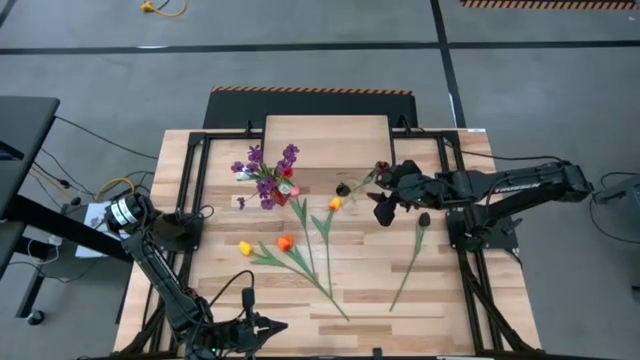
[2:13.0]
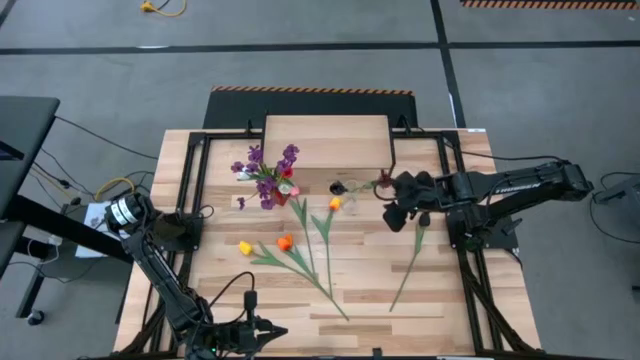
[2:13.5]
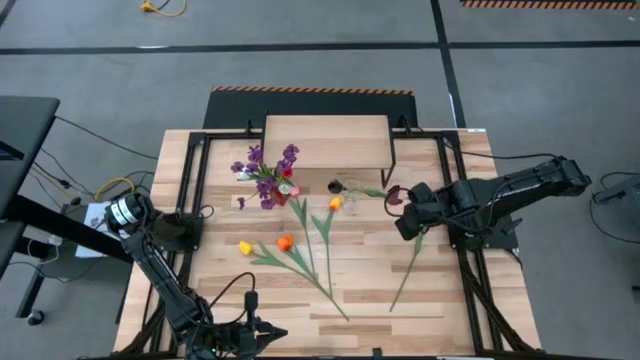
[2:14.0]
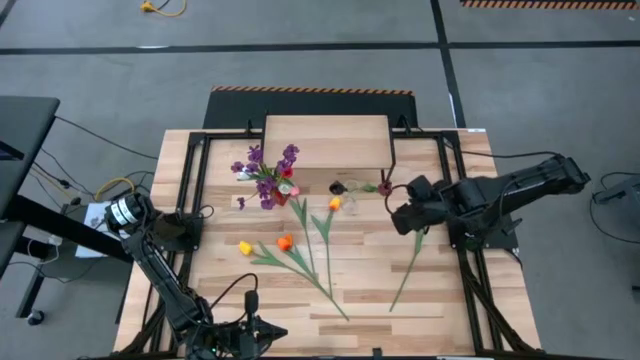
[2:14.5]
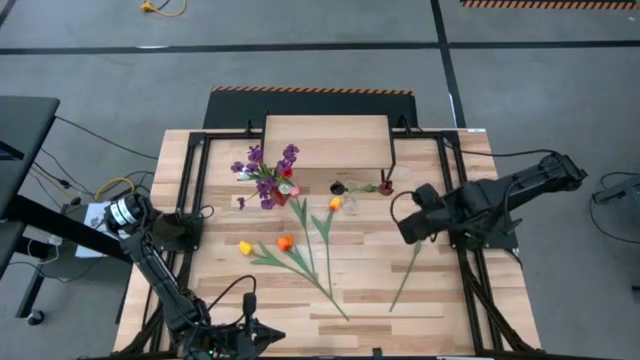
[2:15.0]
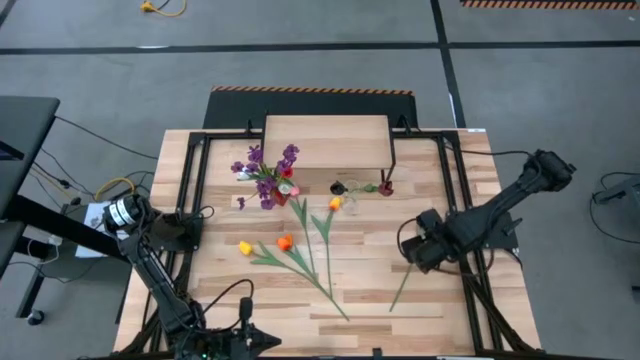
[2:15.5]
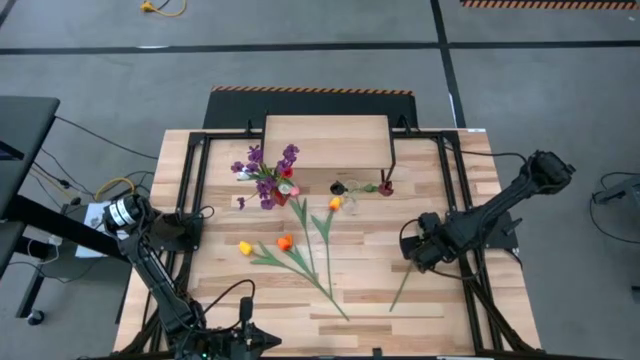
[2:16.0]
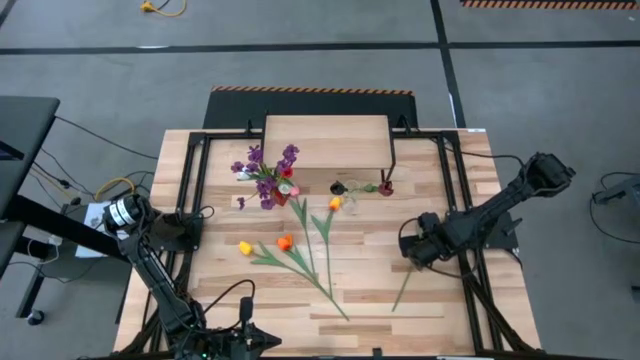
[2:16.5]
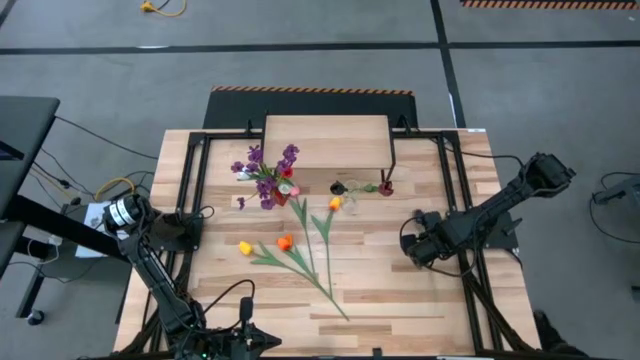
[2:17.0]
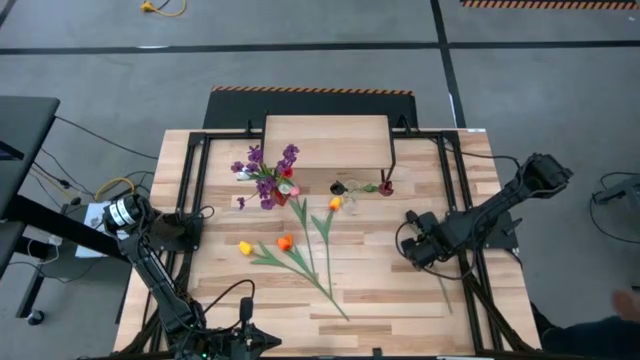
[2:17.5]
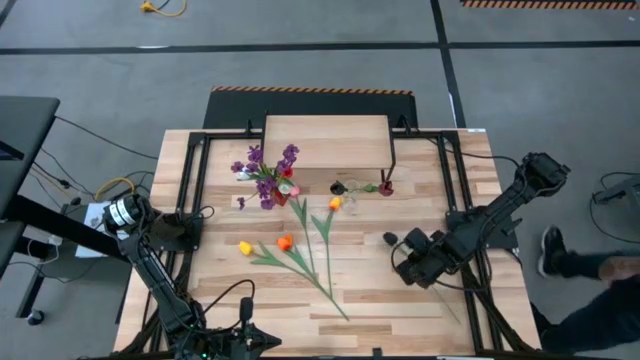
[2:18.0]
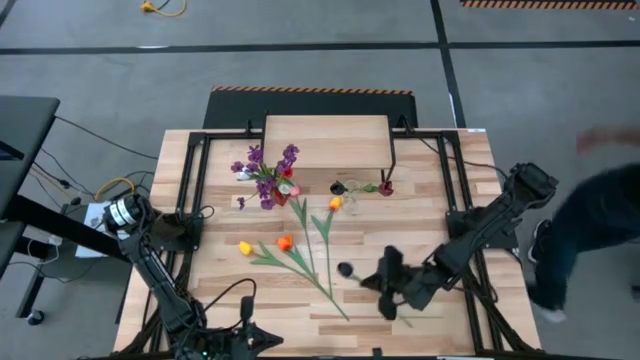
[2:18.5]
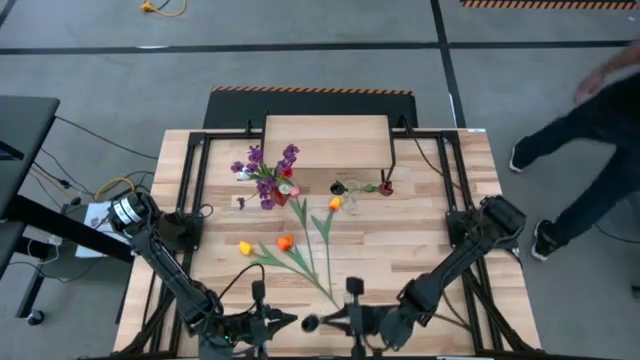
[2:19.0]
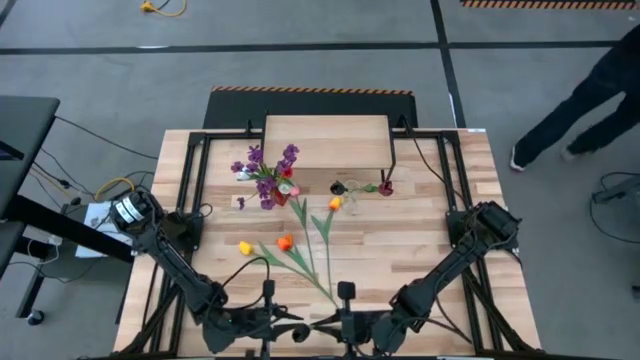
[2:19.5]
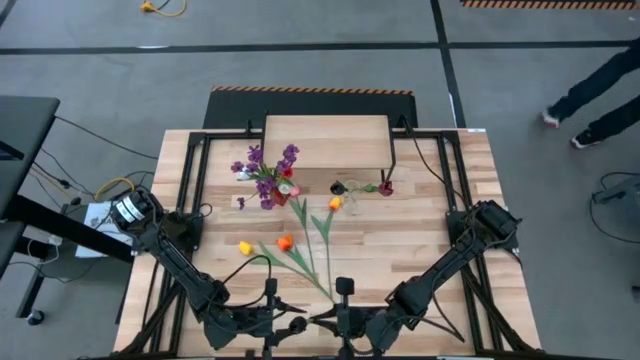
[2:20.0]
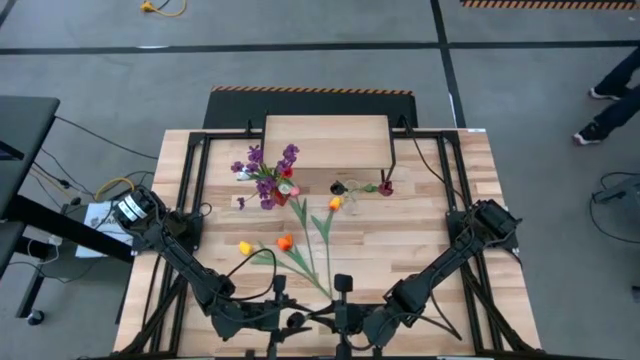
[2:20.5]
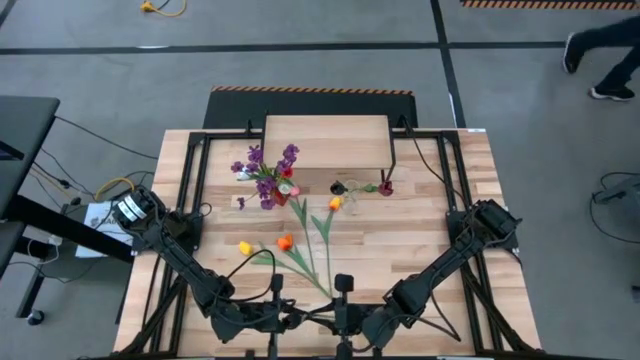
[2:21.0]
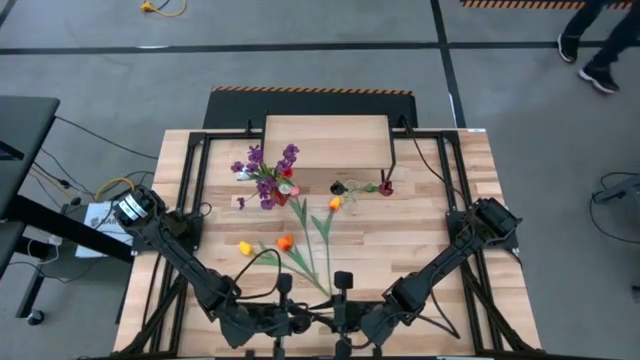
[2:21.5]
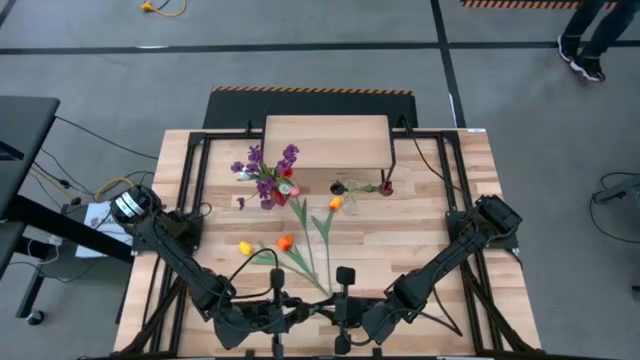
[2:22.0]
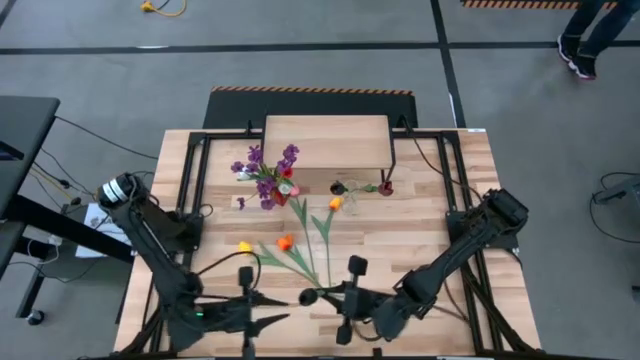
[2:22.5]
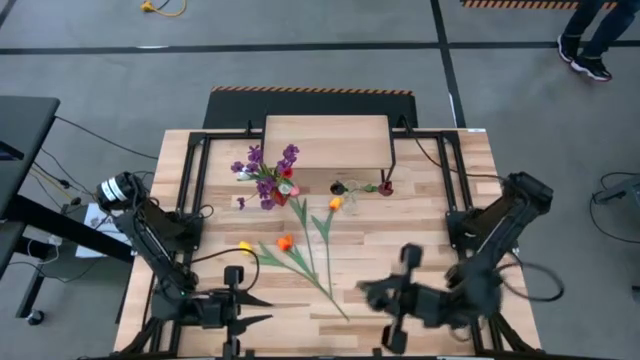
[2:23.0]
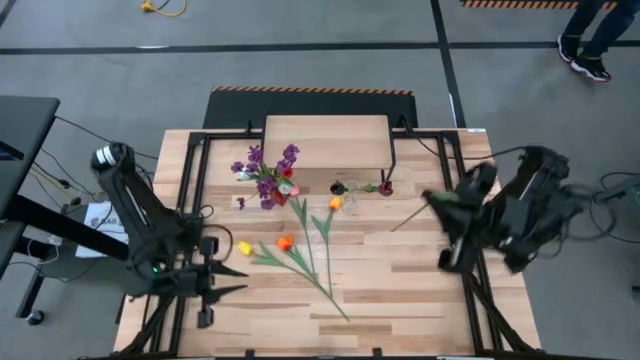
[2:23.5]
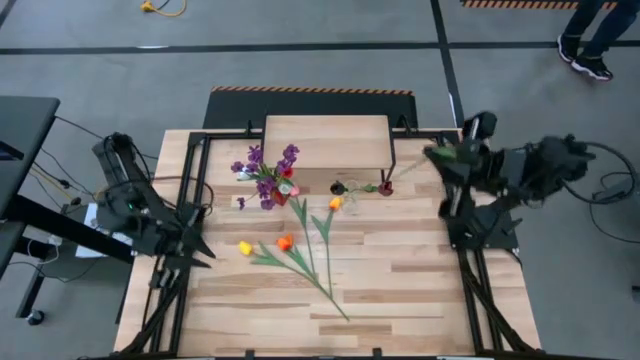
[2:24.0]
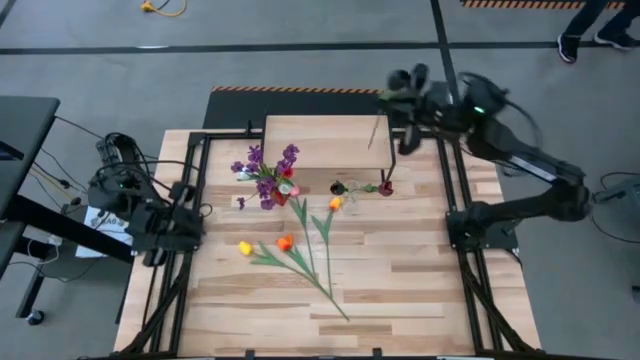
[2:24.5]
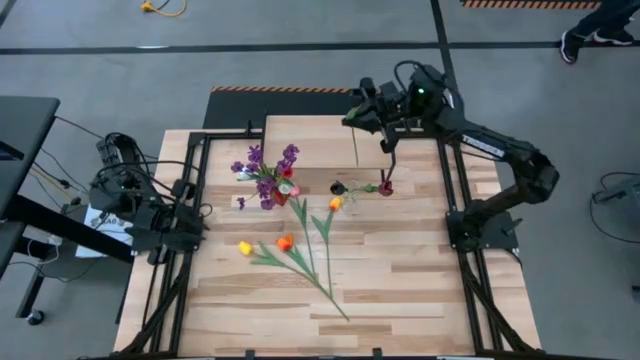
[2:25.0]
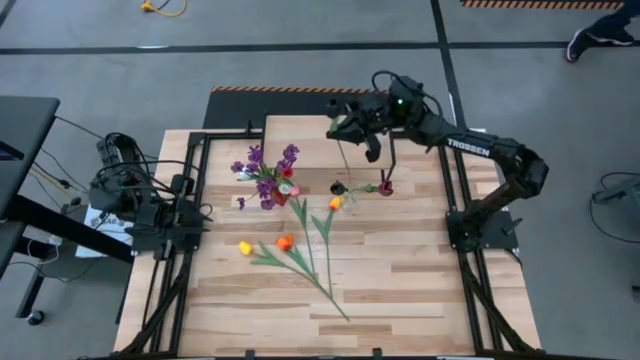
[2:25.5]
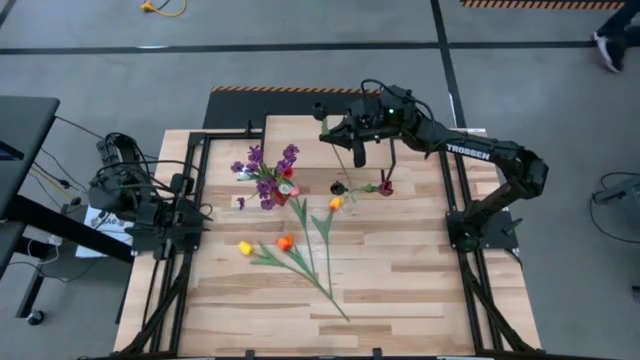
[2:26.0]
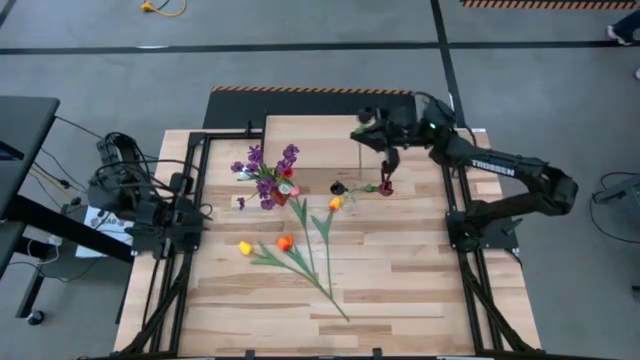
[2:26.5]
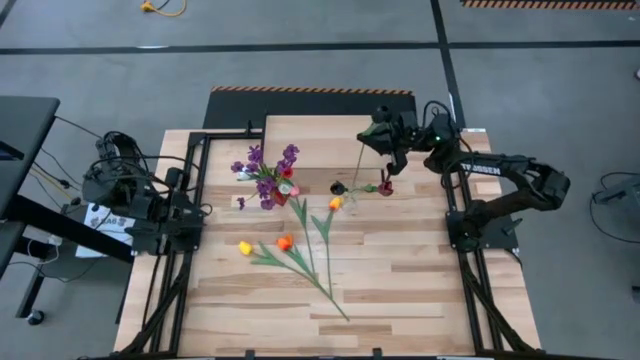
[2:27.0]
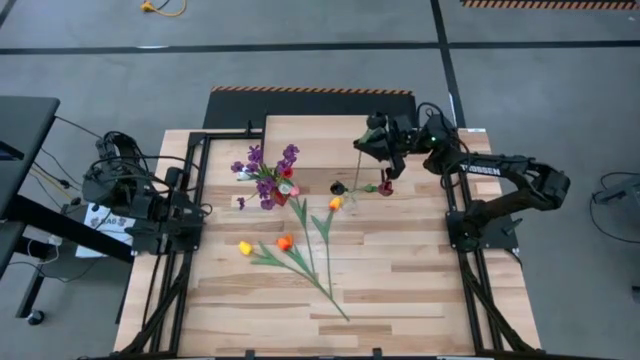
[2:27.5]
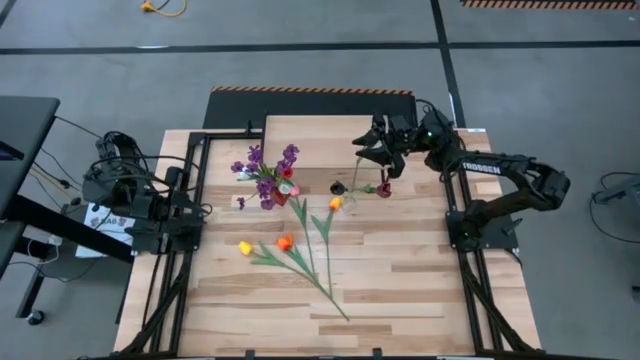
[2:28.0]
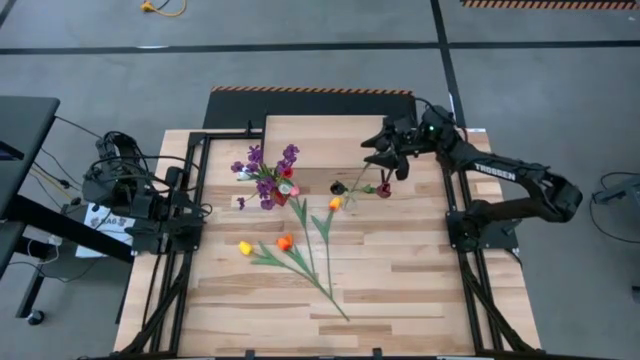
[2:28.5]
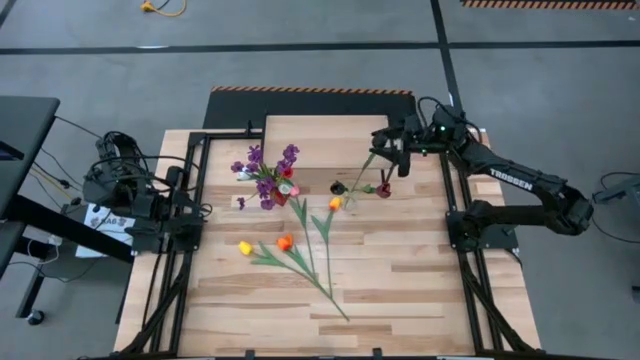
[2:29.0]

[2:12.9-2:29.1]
Task: Pick and place flowers into a vace then onto a shelf
Put the black flower into the transparent flower vase

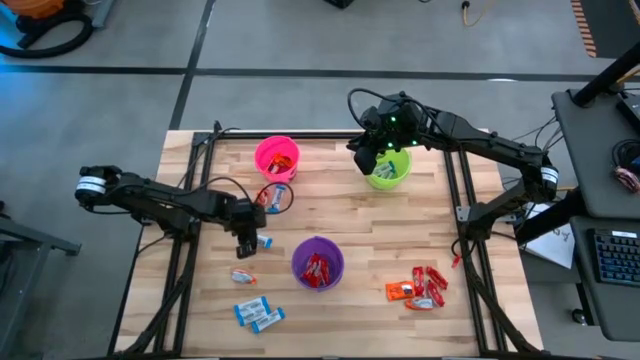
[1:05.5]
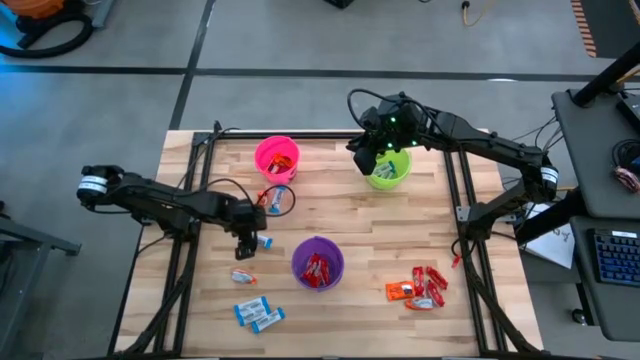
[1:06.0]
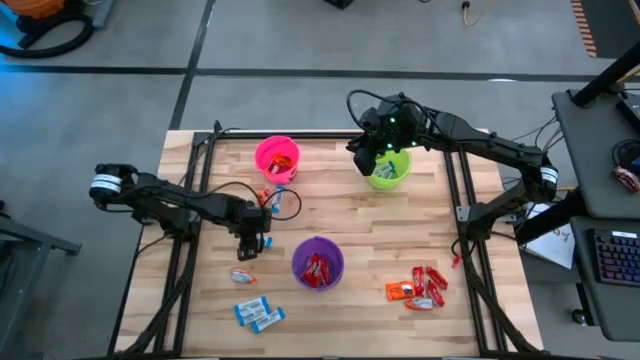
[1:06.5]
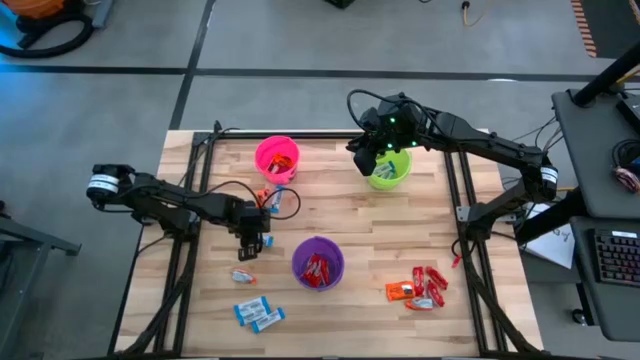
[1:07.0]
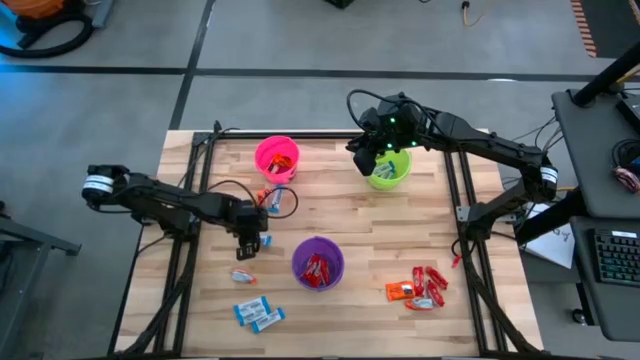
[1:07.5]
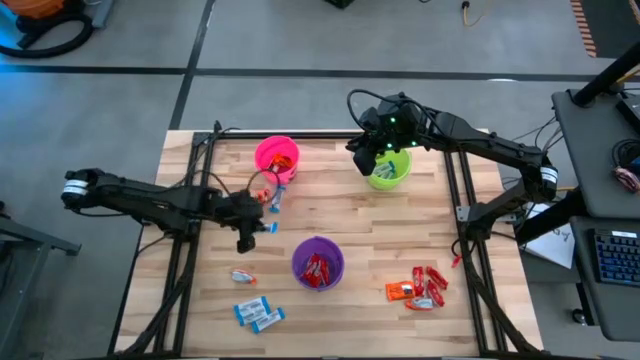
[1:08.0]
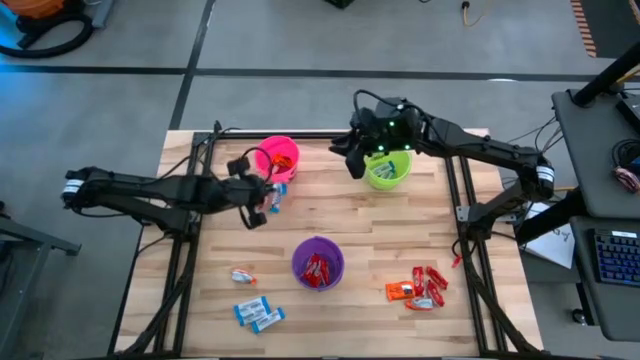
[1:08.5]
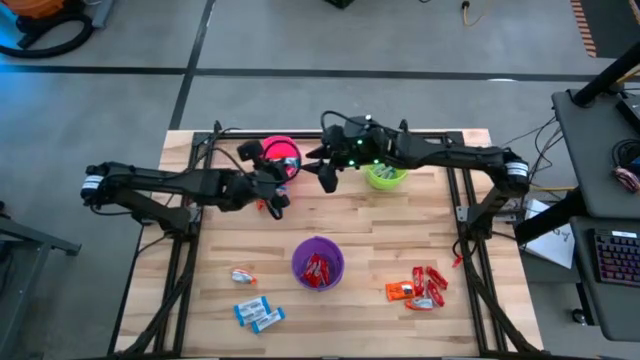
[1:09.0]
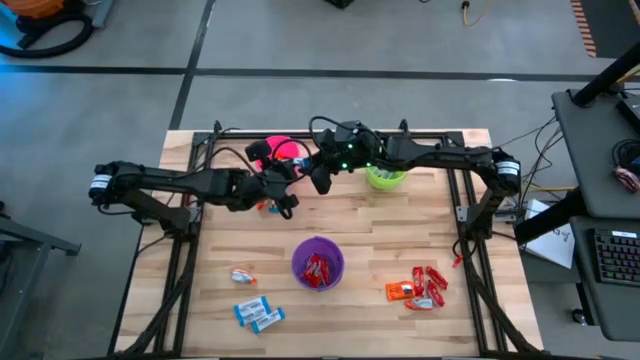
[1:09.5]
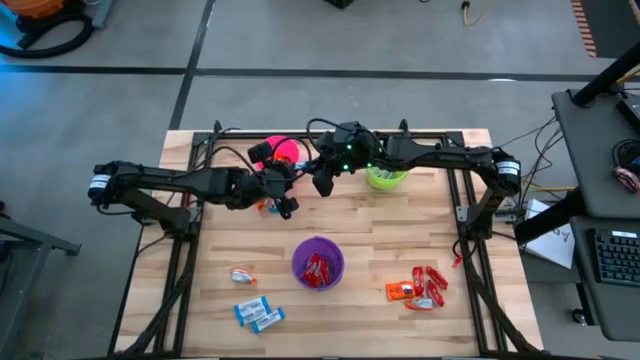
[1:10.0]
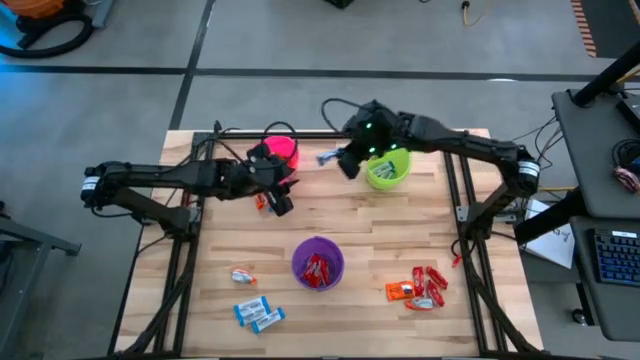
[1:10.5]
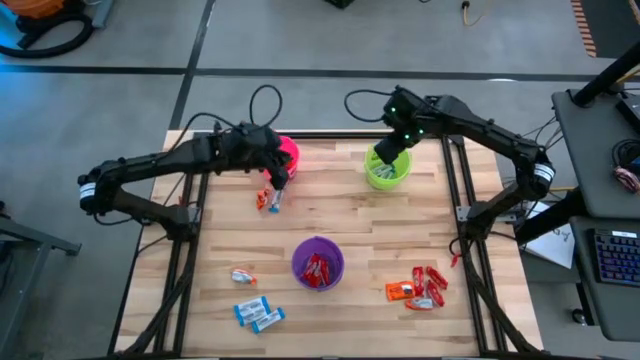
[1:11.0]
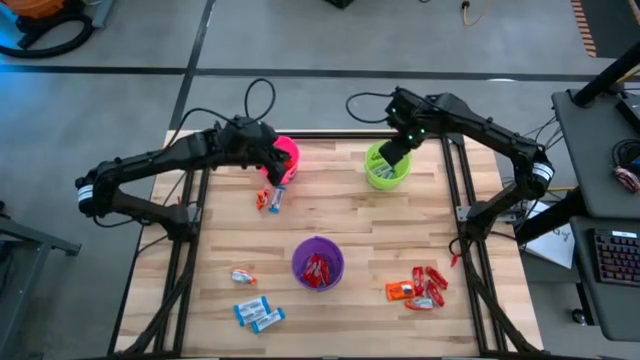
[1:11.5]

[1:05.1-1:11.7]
Task: Sort candy
Put the white-blue chocolate into the green bucket
